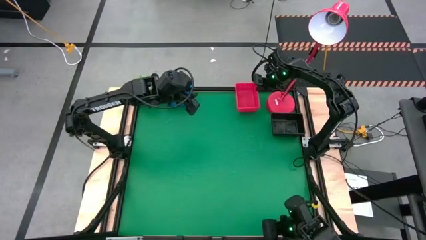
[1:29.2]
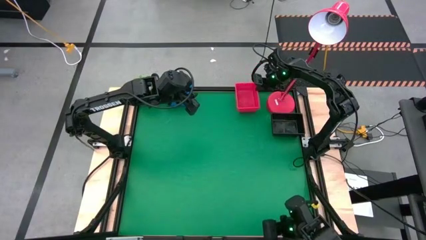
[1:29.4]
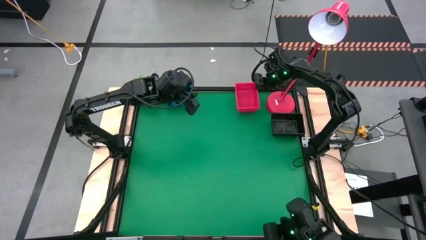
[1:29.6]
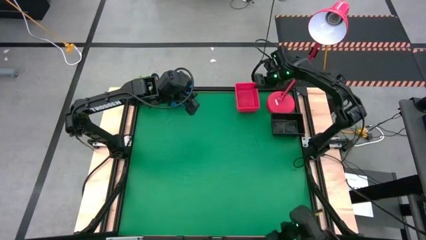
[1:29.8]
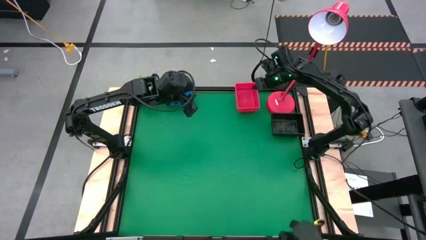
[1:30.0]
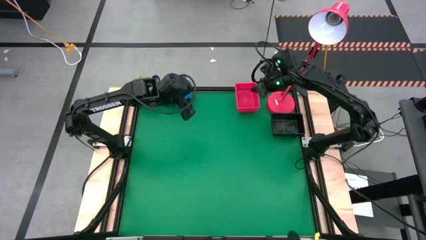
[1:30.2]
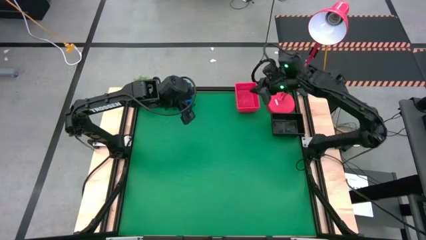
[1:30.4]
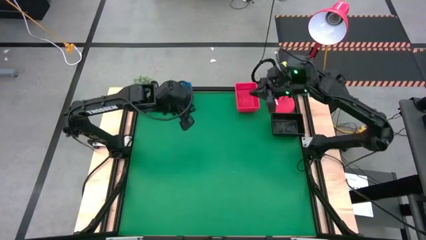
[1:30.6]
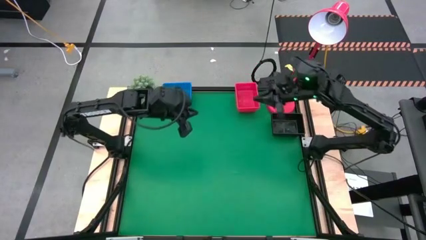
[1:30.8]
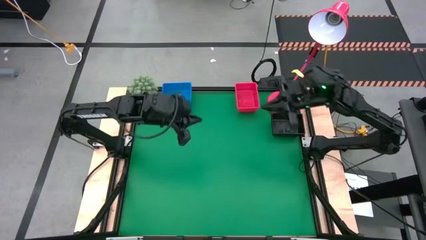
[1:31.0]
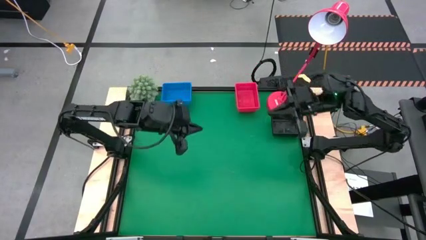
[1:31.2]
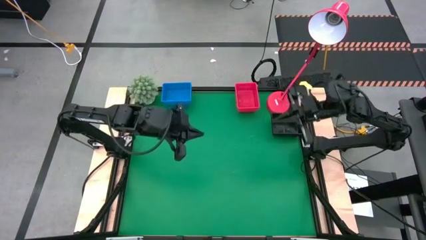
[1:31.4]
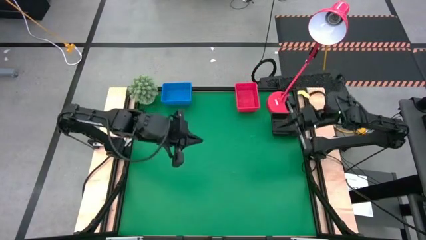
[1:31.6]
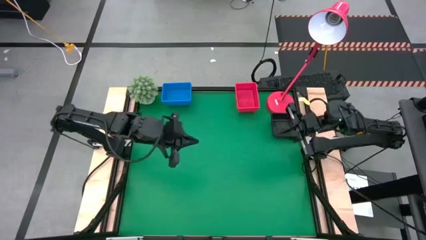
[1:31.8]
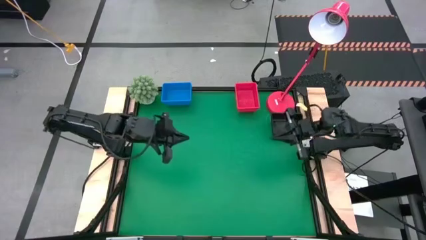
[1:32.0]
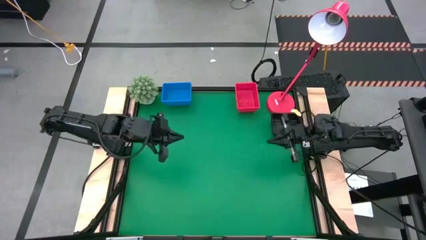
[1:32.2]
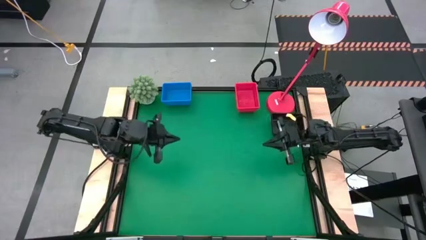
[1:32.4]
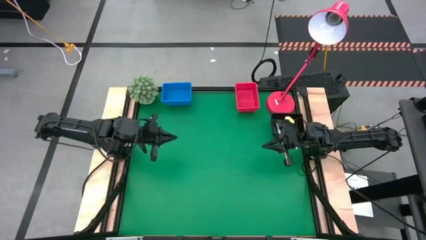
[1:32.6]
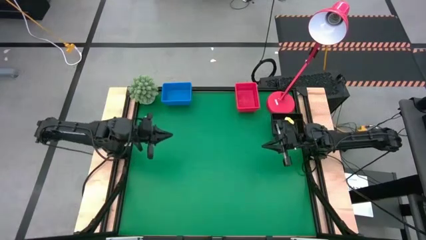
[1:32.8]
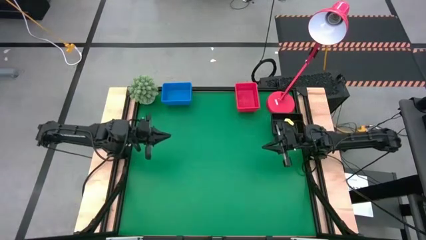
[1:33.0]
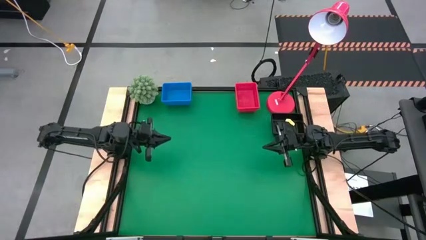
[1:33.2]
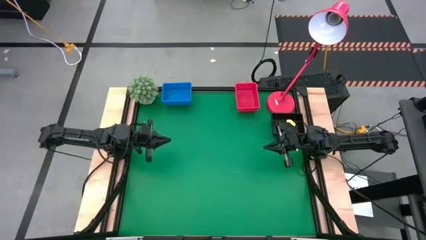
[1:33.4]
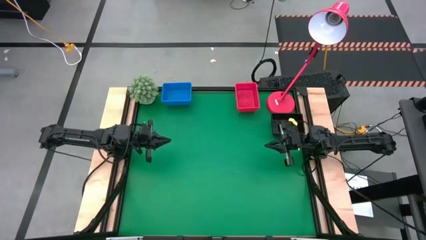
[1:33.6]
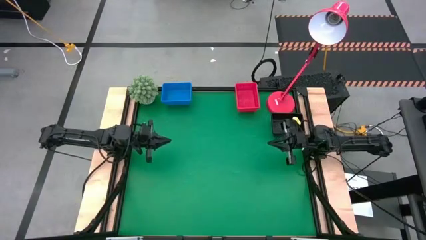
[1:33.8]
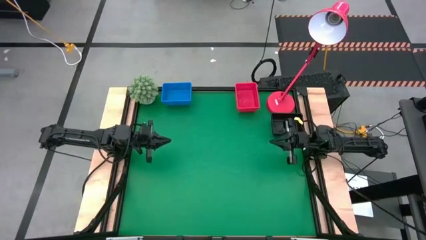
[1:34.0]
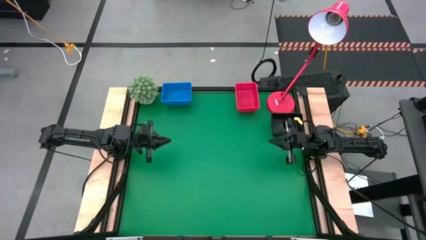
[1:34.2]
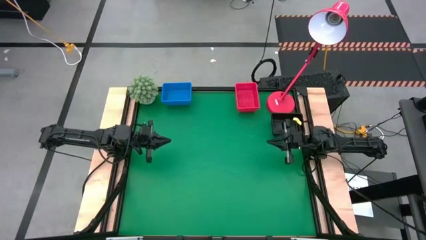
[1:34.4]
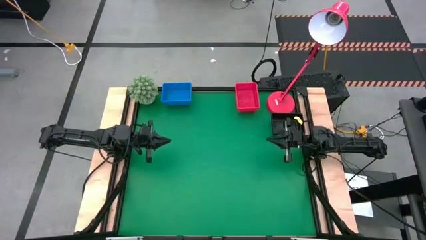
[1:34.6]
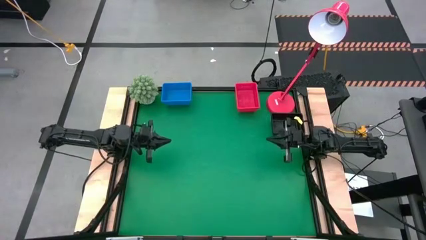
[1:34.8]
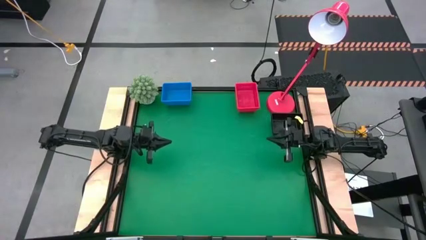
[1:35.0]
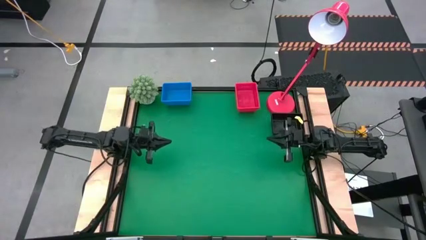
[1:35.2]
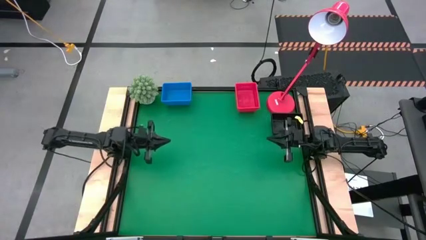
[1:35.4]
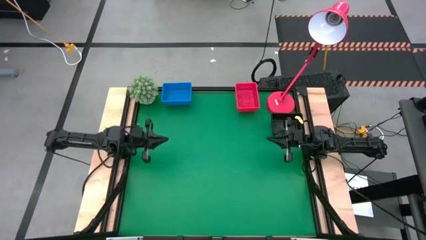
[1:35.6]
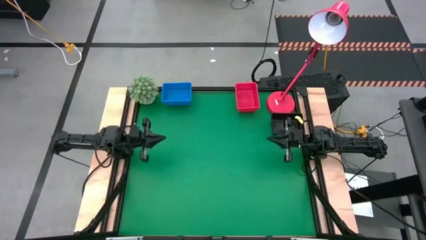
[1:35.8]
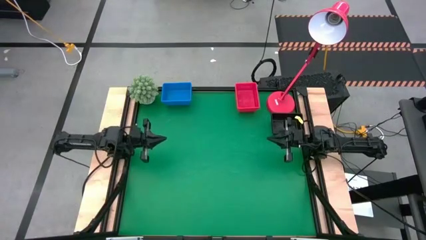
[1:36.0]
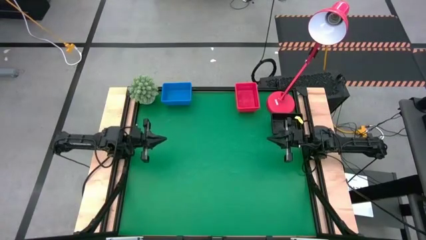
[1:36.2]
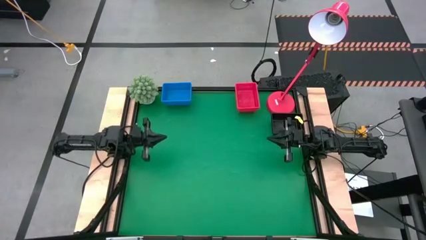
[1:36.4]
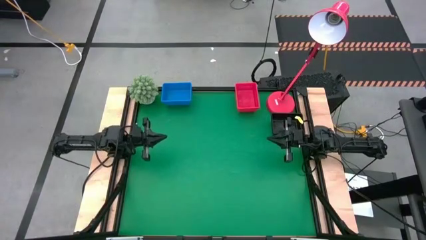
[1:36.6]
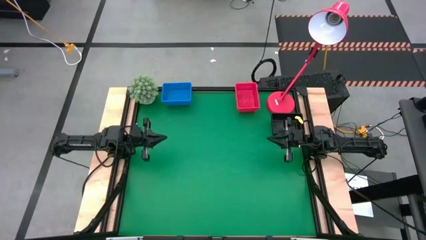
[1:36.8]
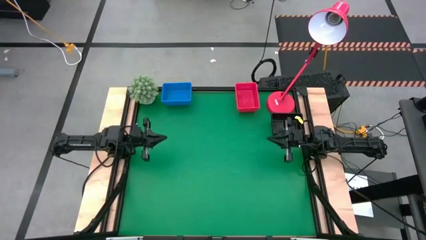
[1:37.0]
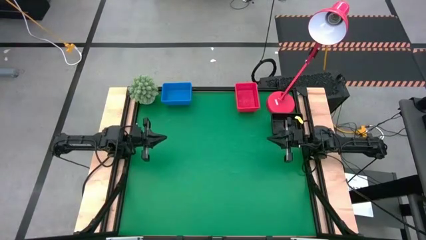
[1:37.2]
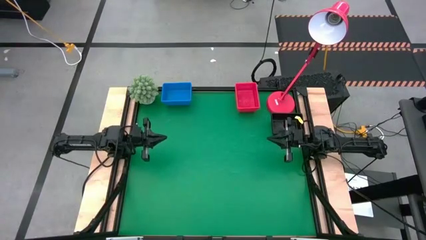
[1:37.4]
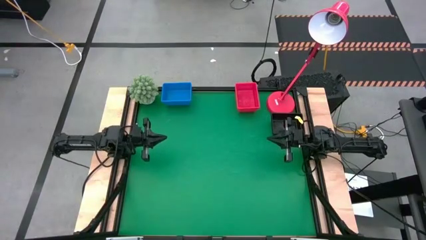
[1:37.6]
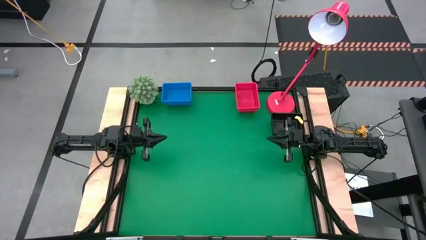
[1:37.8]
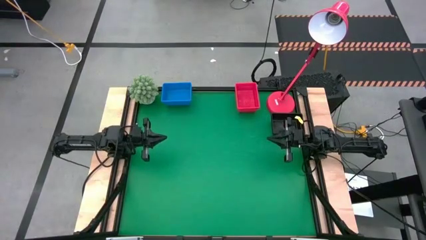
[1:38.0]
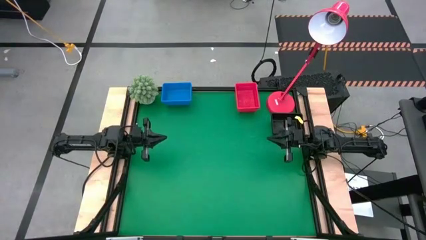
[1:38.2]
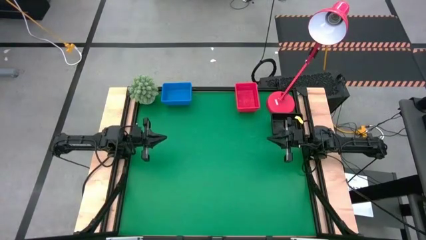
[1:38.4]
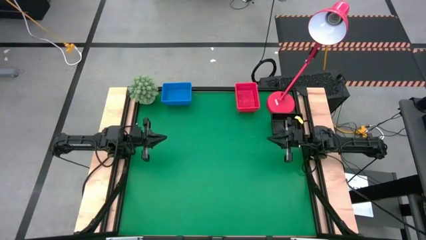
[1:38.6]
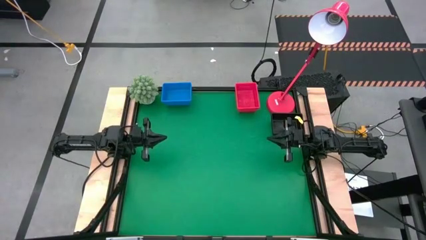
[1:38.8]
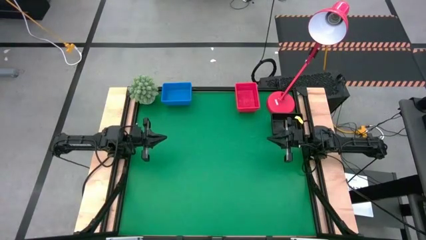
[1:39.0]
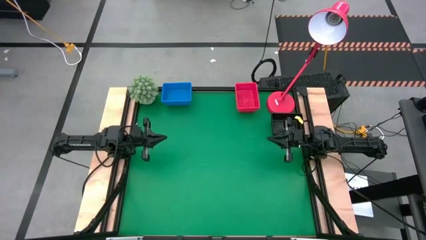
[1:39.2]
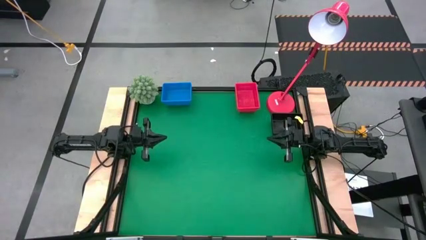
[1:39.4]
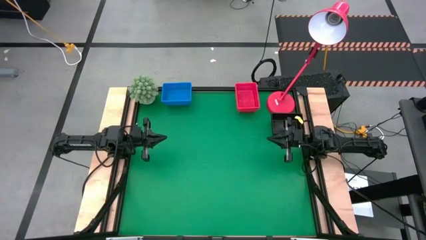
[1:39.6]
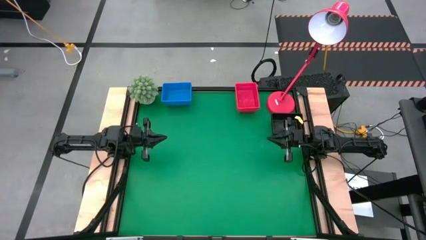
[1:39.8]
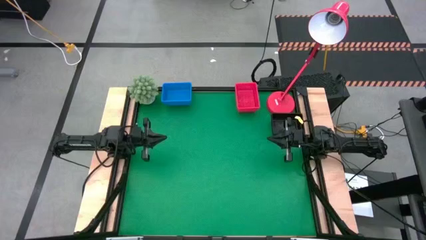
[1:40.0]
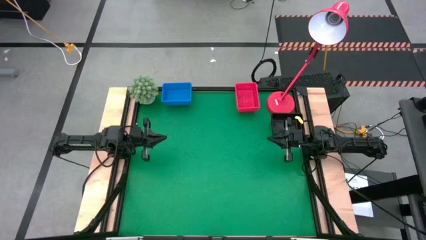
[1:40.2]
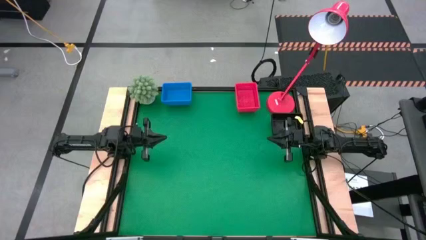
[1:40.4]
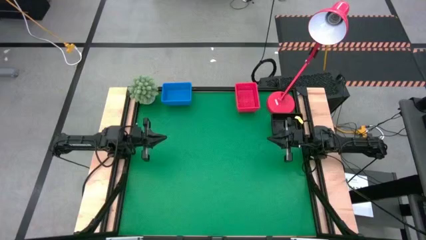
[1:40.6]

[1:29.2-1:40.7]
Return to Home Position
